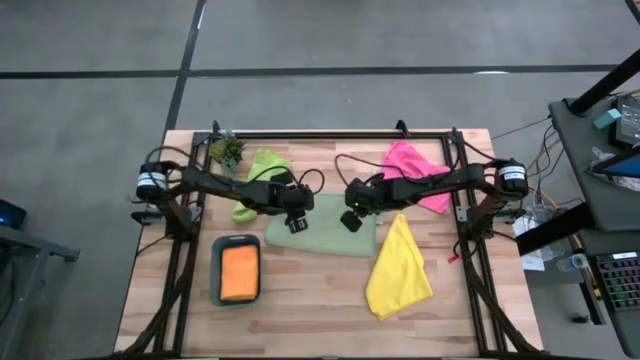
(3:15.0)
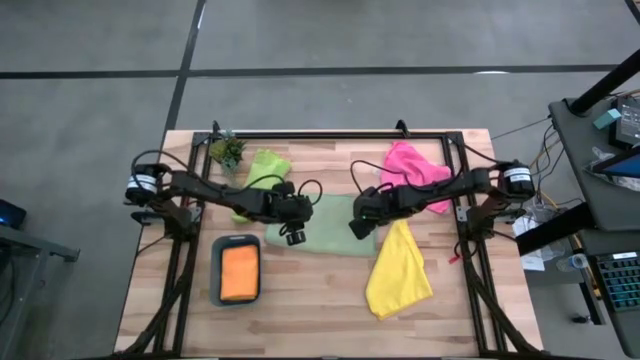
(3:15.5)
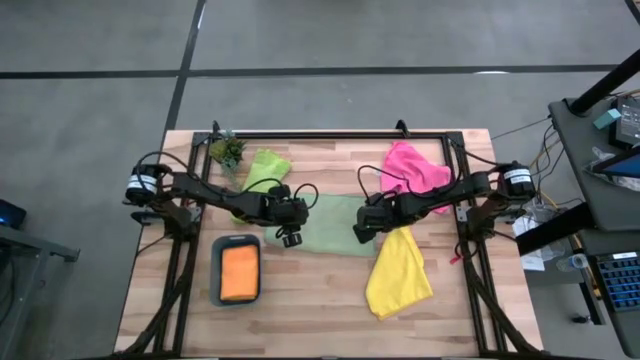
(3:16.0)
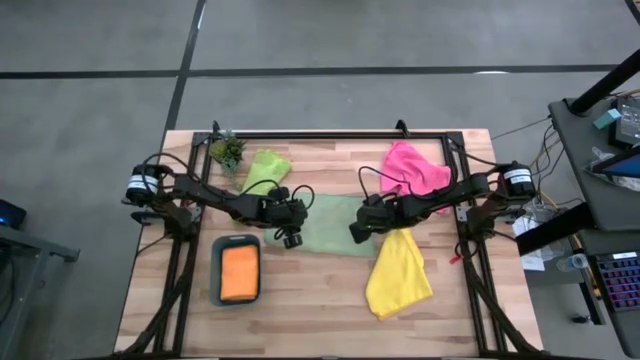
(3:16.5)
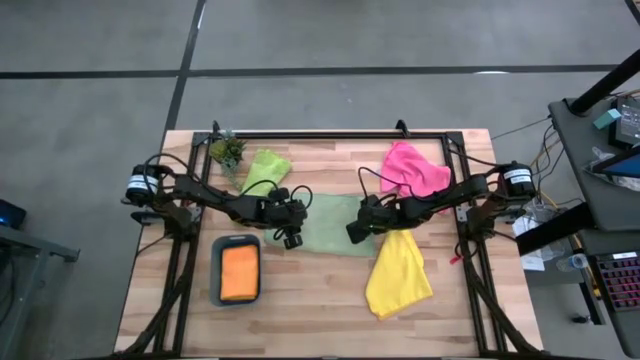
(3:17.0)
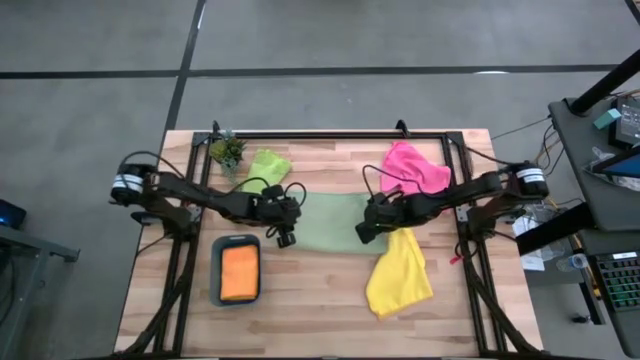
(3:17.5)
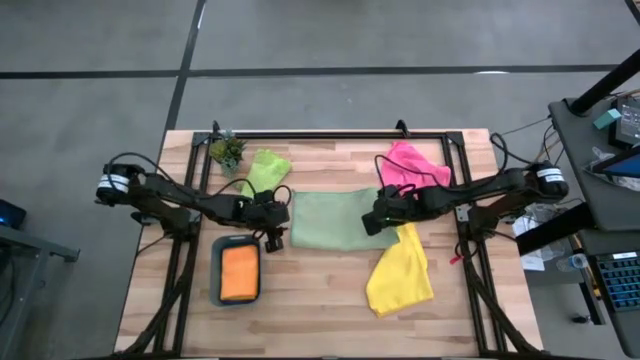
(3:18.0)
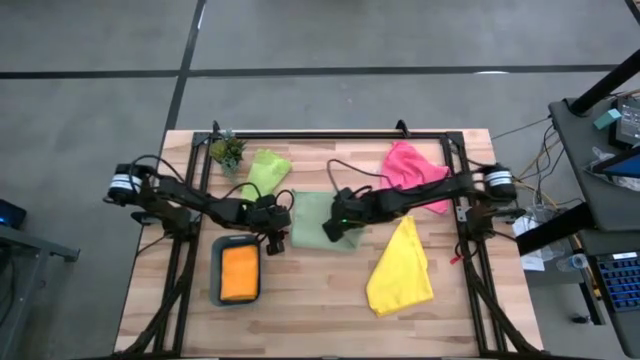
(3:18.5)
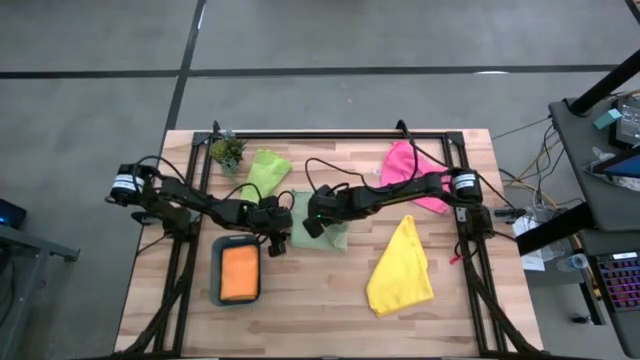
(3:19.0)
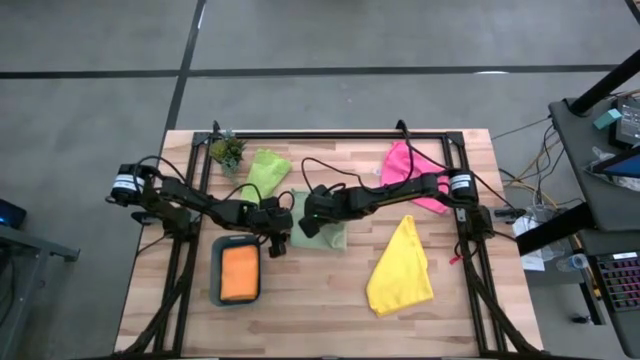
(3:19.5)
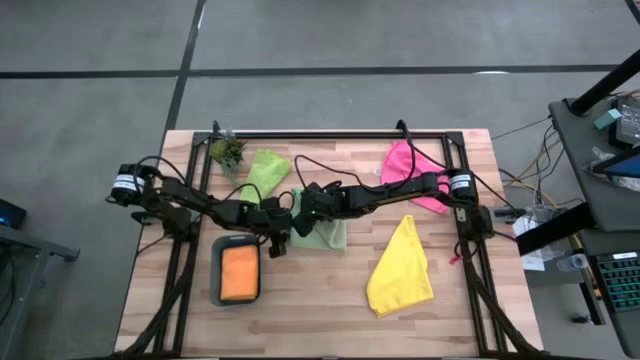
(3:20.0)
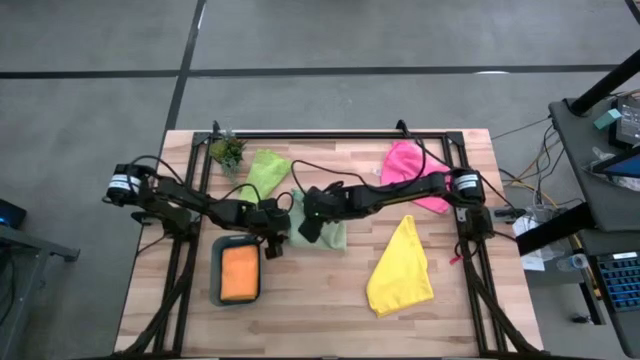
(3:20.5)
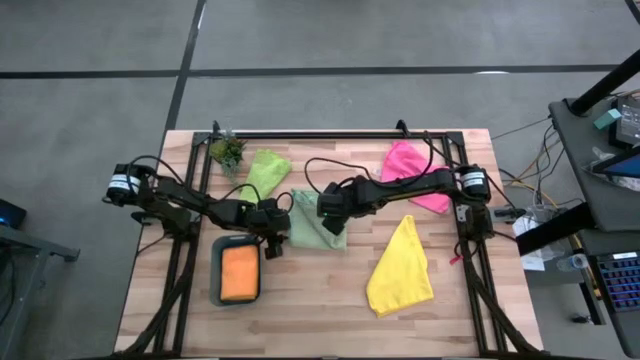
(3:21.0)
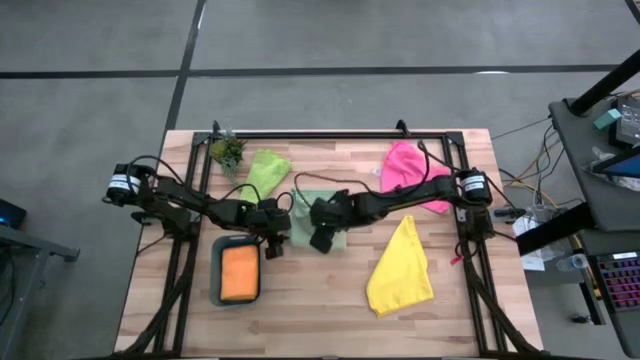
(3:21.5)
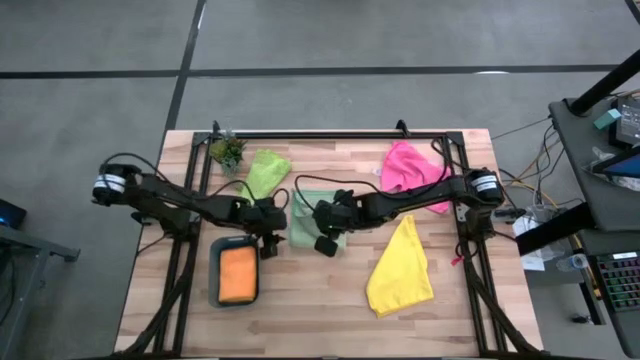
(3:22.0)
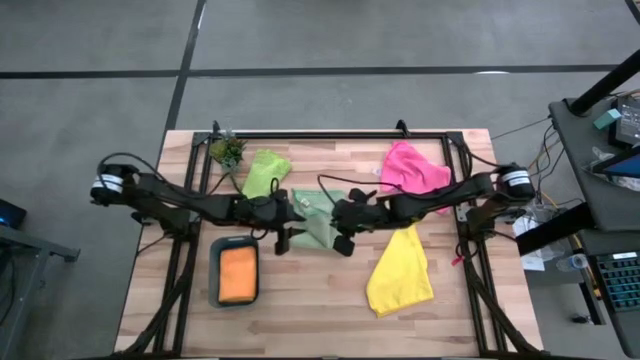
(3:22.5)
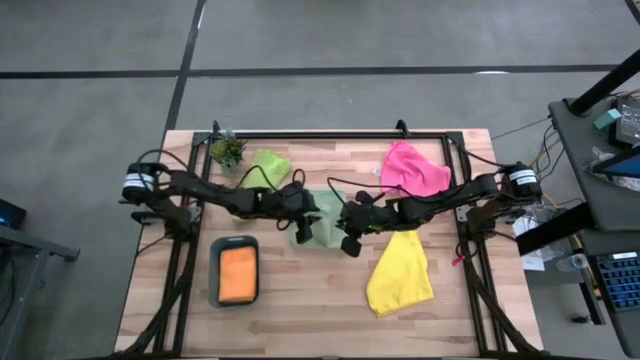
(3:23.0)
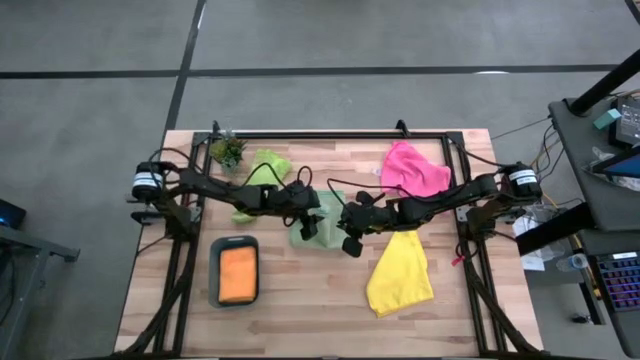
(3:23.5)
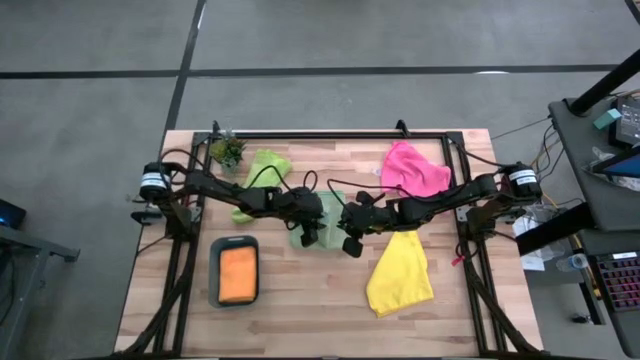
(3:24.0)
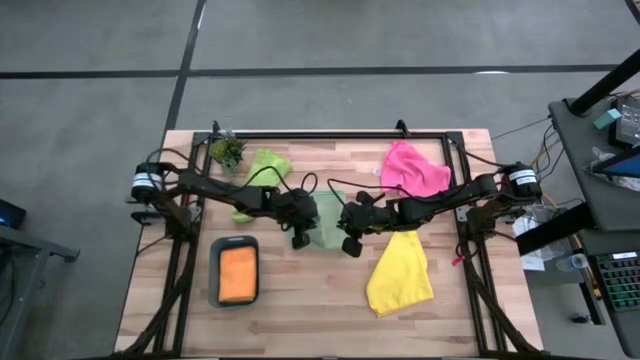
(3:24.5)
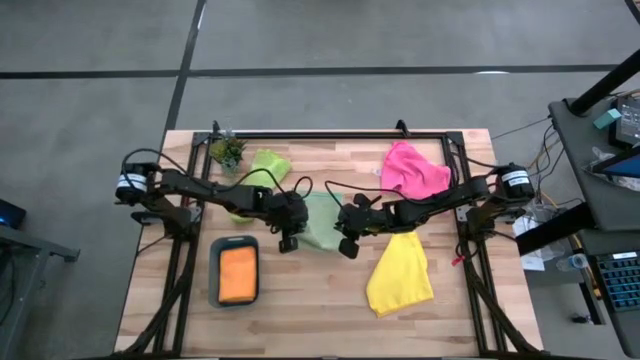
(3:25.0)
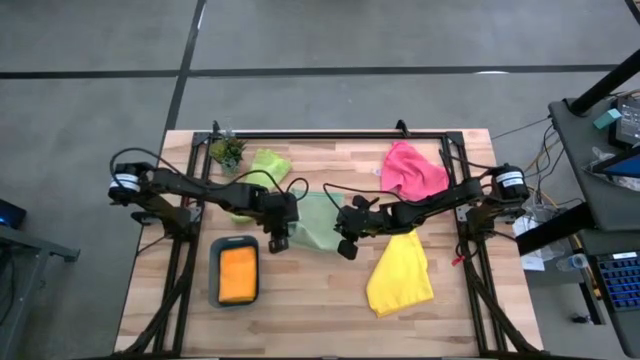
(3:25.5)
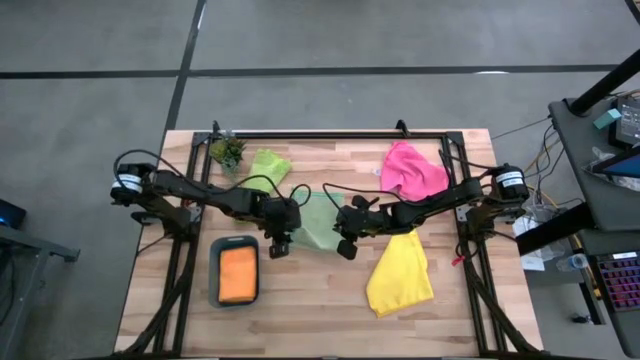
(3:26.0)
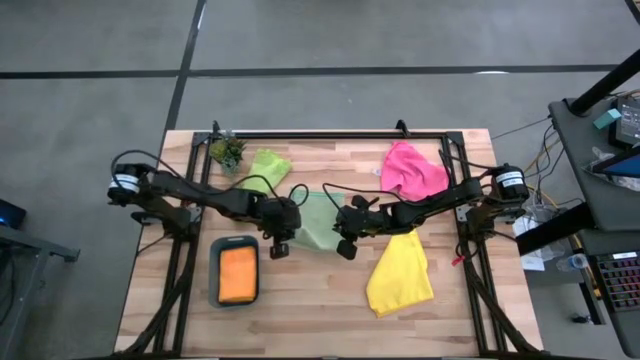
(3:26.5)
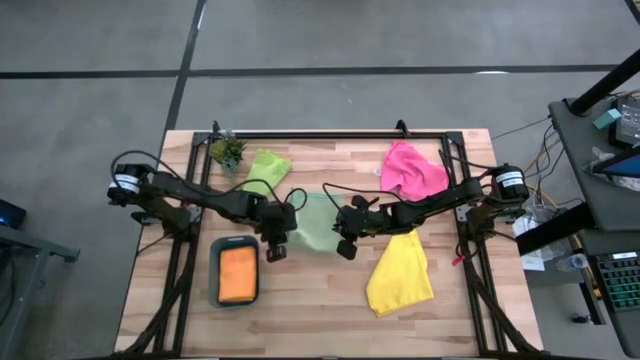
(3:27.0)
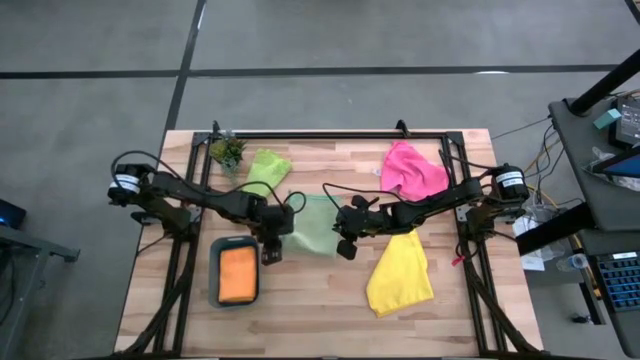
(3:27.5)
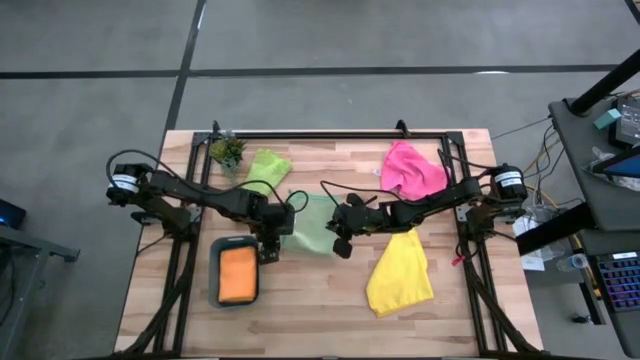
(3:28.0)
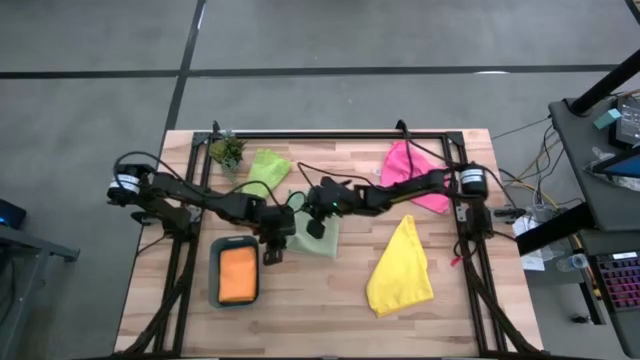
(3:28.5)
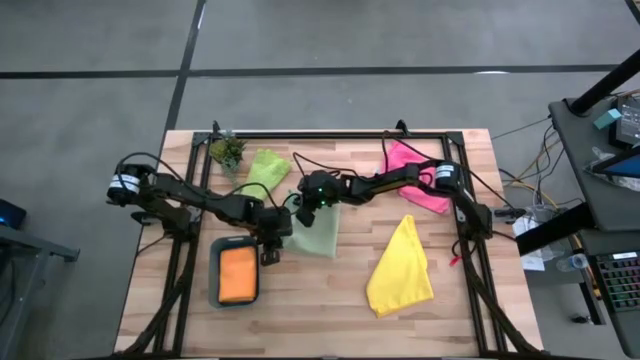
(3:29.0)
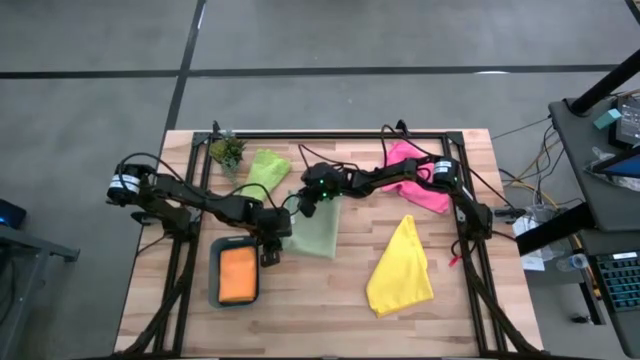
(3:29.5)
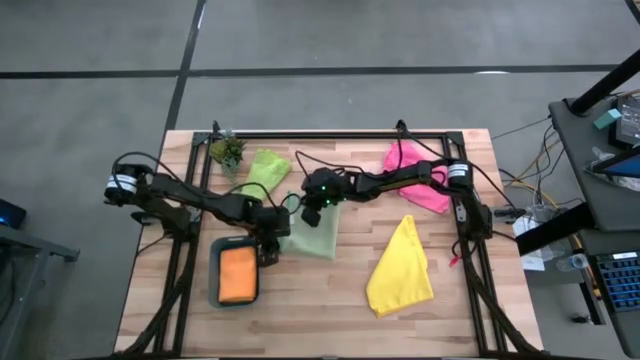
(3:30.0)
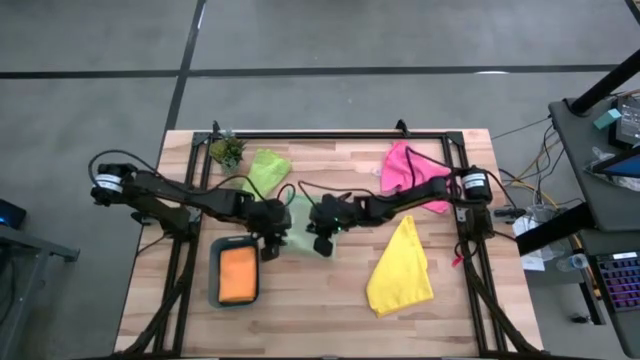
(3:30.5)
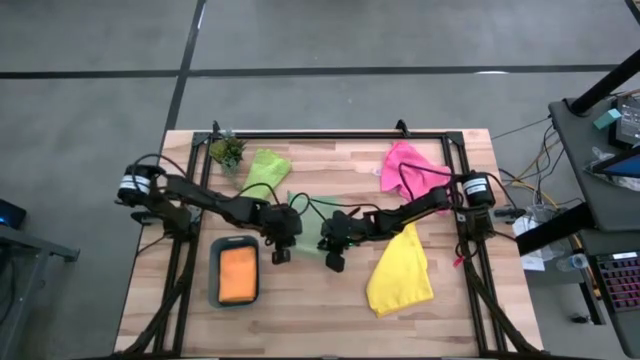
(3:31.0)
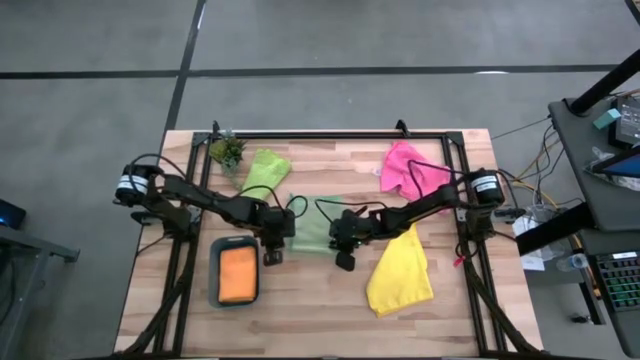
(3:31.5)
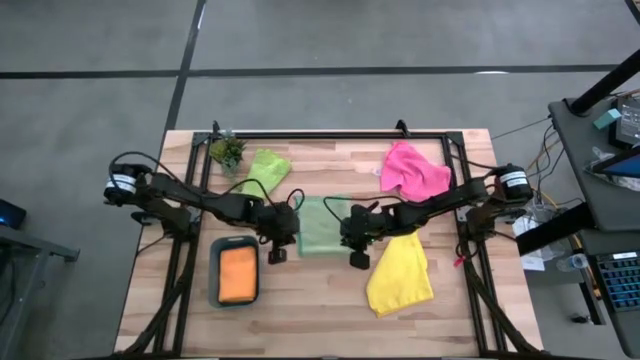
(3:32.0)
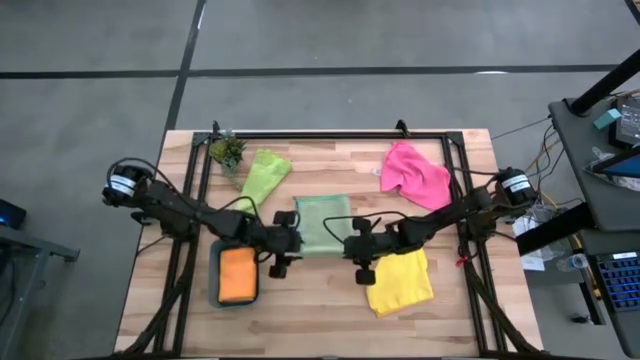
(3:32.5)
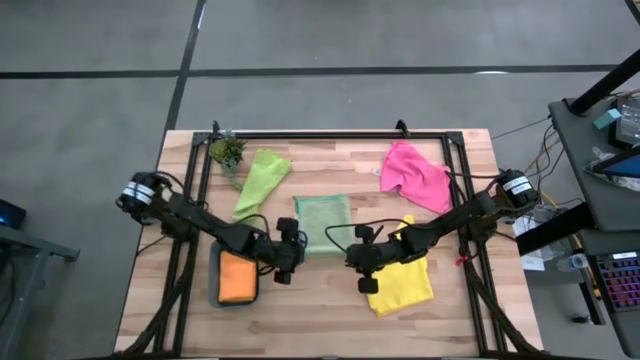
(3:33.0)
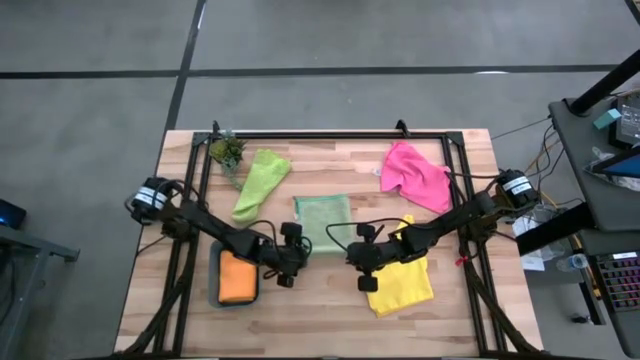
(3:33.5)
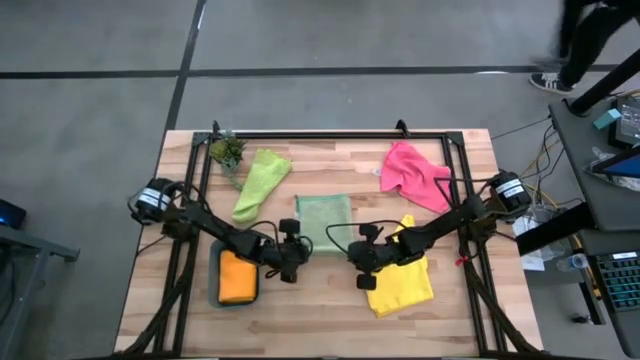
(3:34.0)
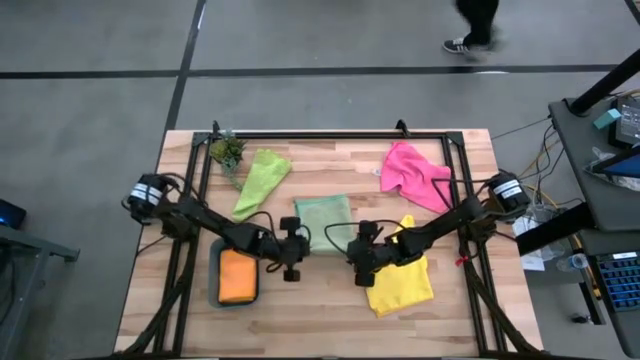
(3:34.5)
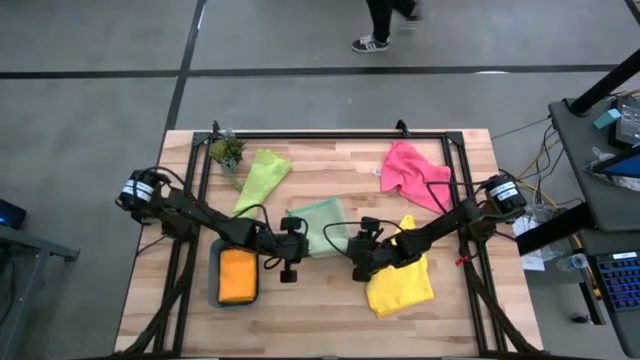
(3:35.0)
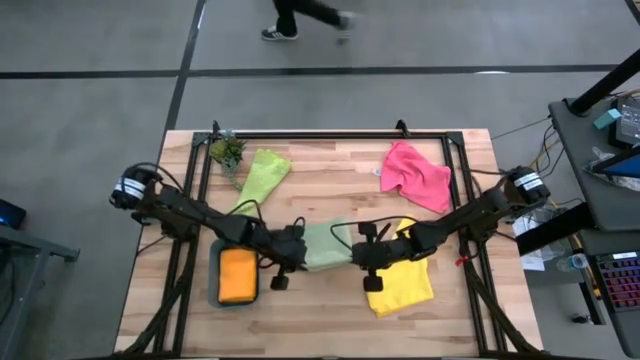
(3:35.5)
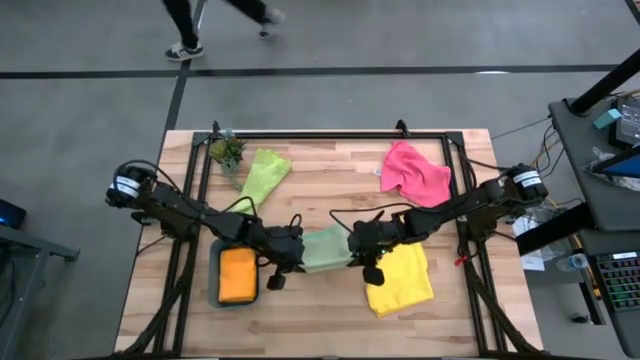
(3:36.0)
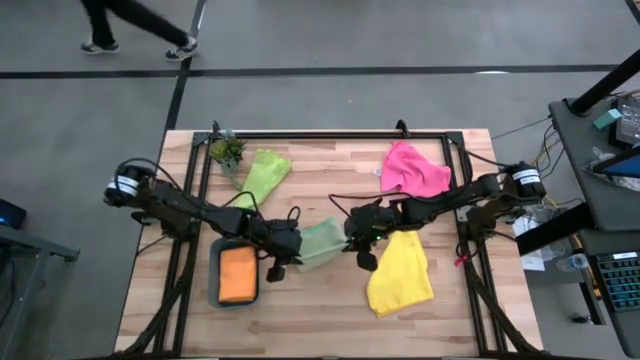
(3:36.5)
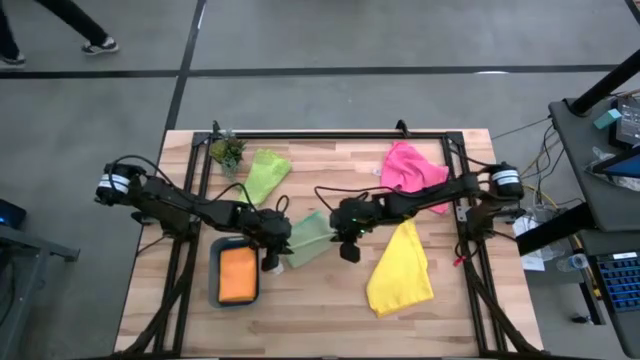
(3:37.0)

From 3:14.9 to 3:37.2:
Task: Fold microfiber towels
Fold the light green microfiber cloth
